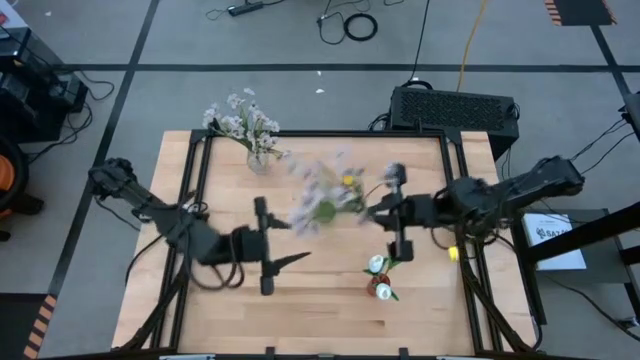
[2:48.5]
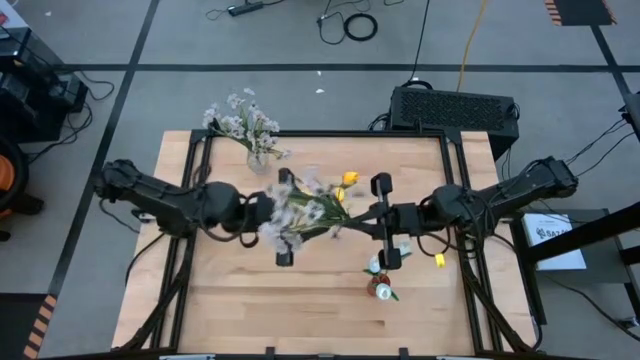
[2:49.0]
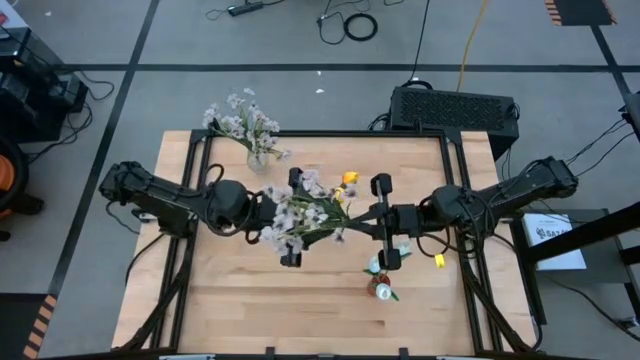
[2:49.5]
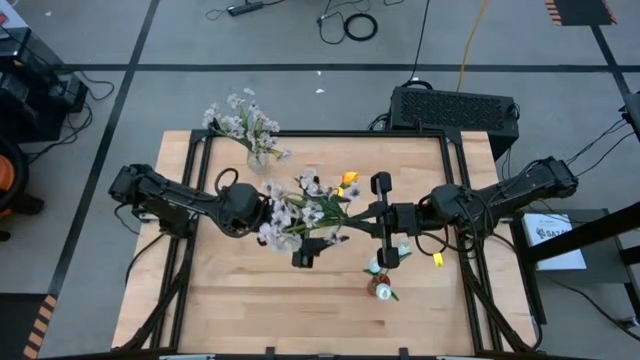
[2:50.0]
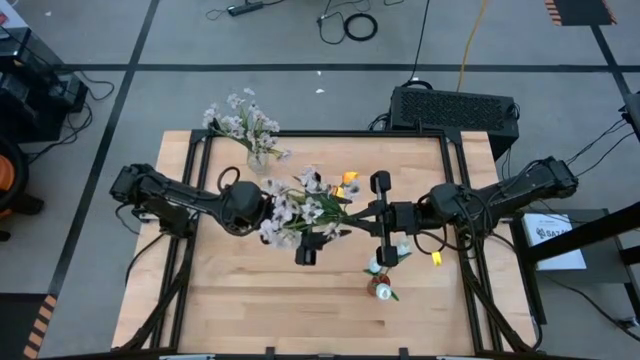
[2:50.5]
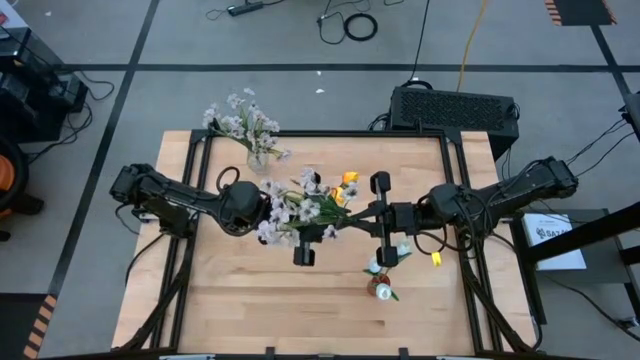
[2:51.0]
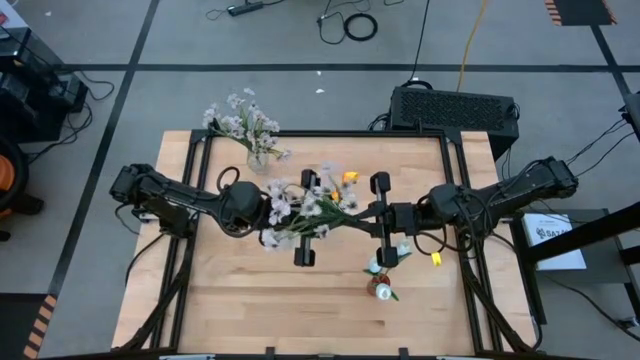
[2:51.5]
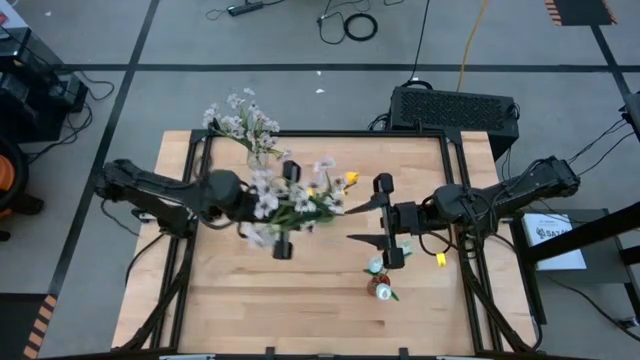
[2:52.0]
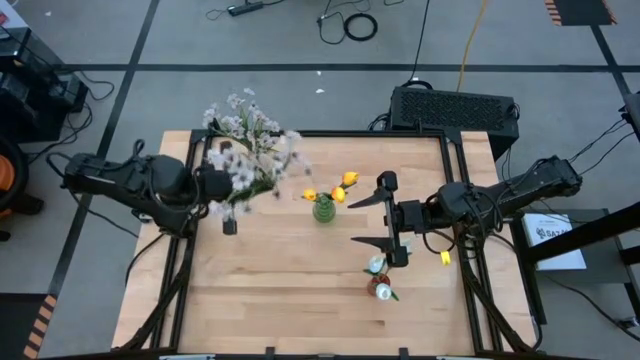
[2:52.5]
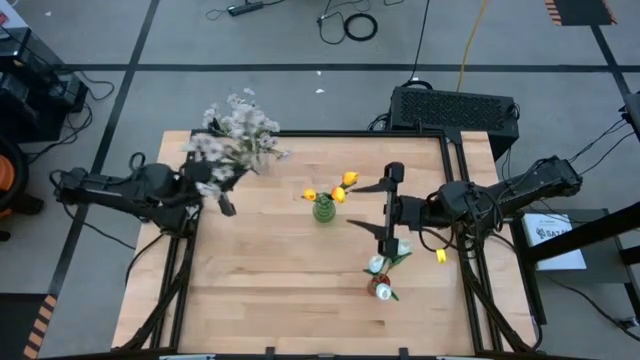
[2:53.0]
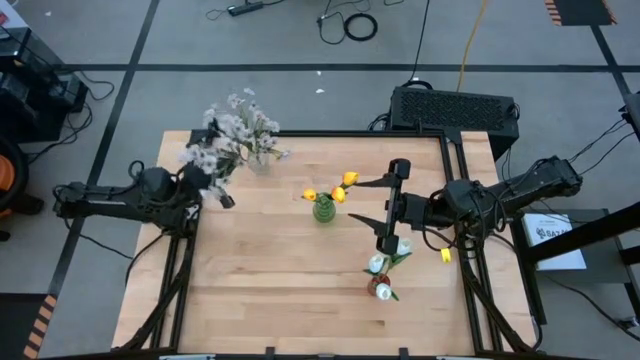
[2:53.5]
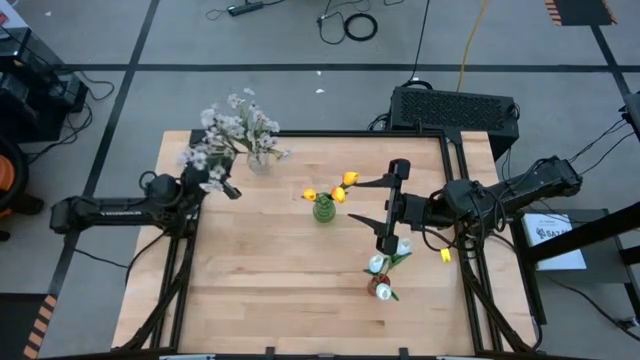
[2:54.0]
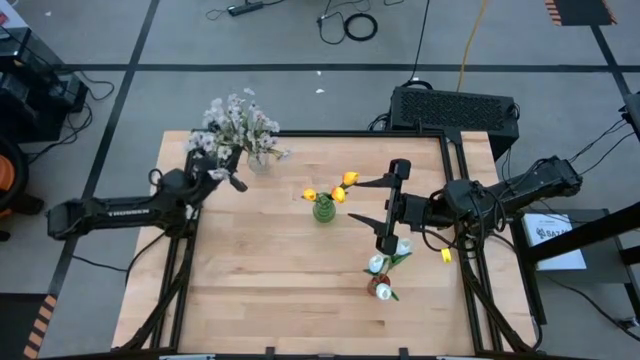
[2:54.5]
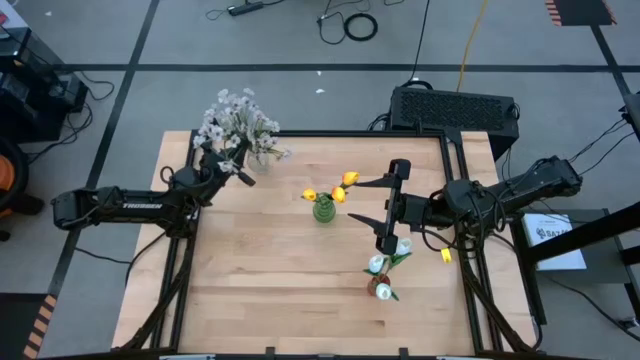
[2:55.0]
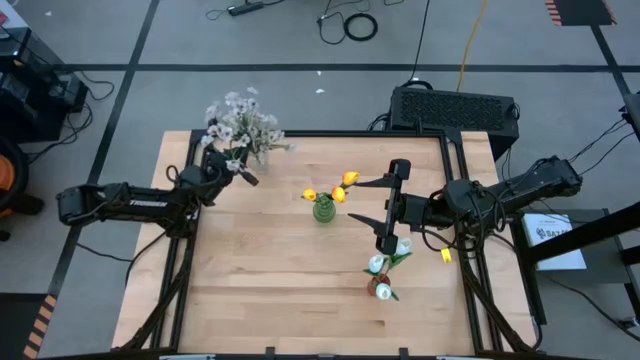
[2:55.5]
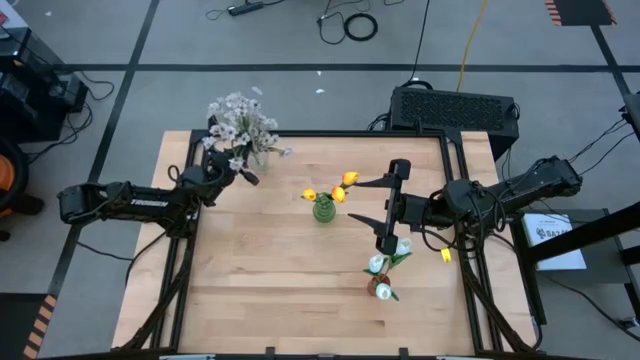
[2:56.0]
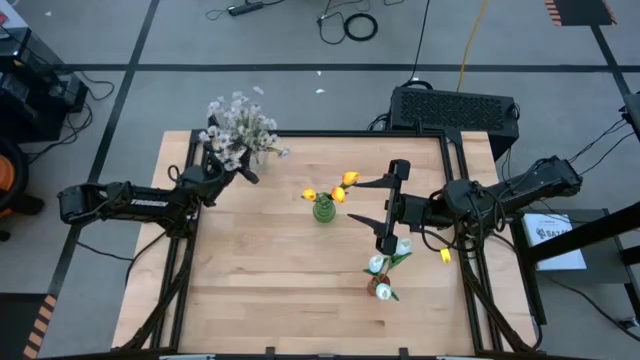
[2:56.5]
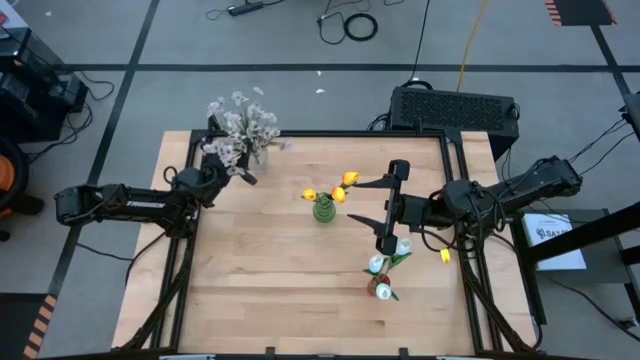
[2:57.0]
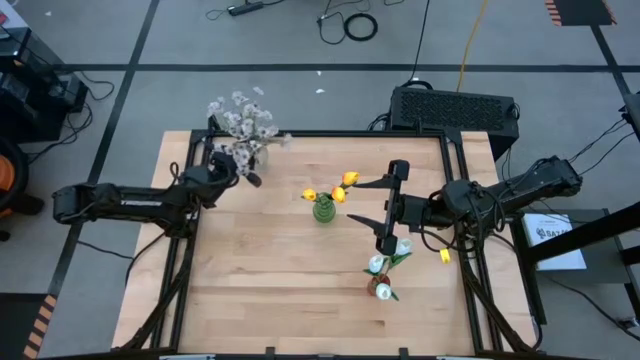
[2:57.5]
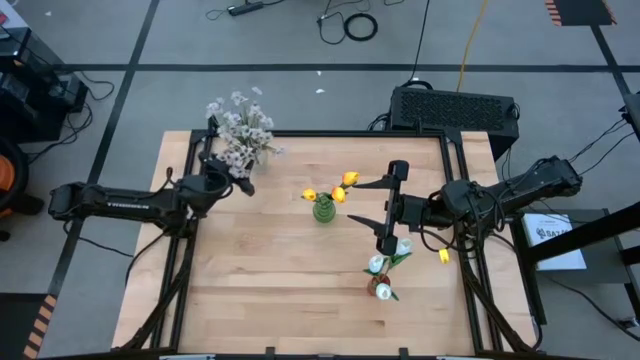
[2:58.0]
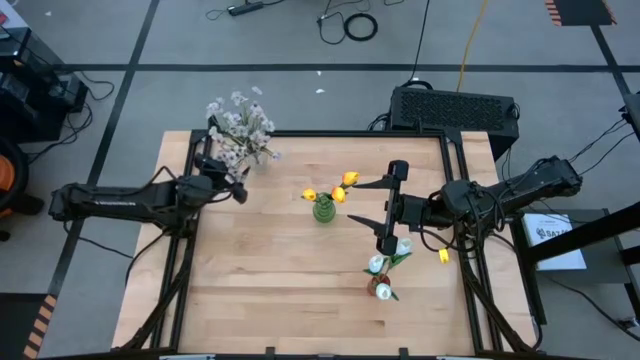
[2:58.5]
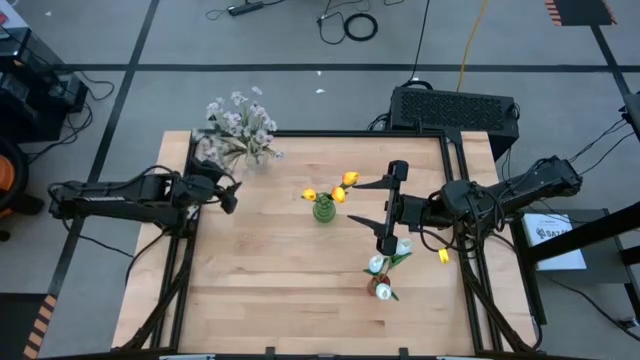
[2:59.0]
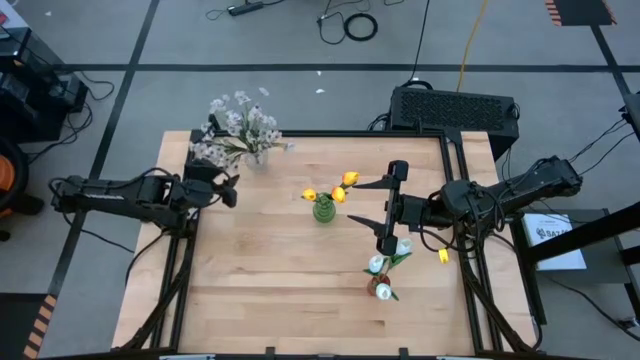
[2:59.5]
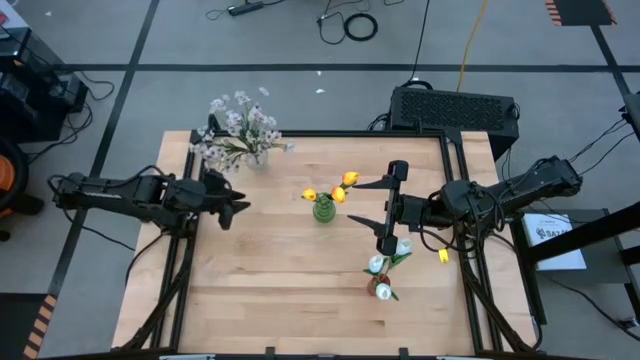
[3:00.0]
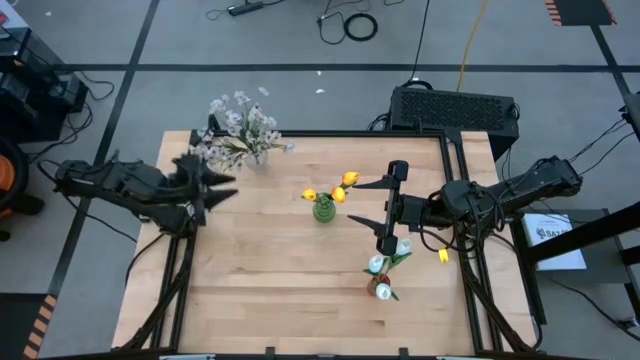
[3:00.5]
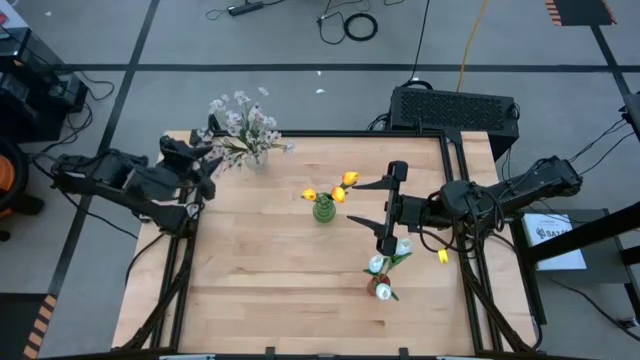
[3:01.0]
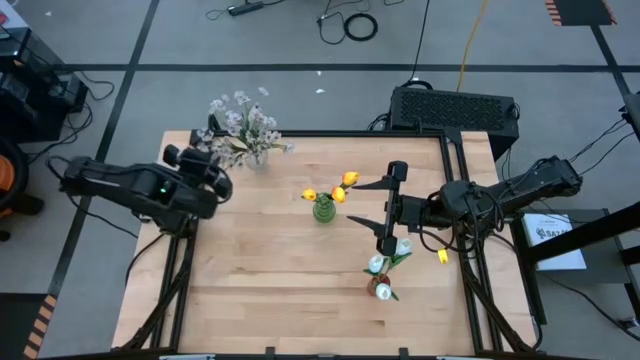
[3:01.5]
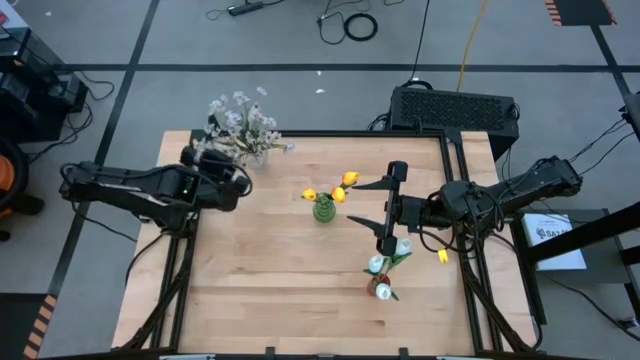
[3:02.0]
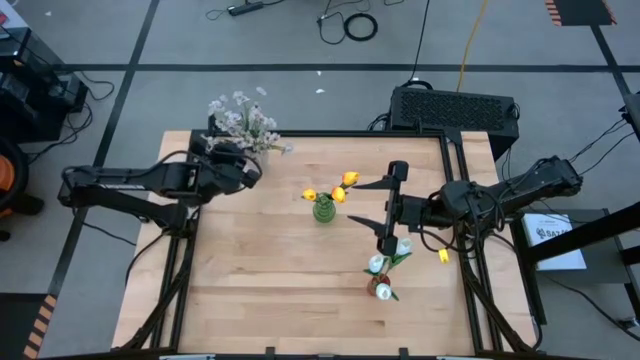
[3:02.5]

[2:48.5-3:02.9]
Task: Sort flowers into vase by color
Put the white flowers into the transparent vase

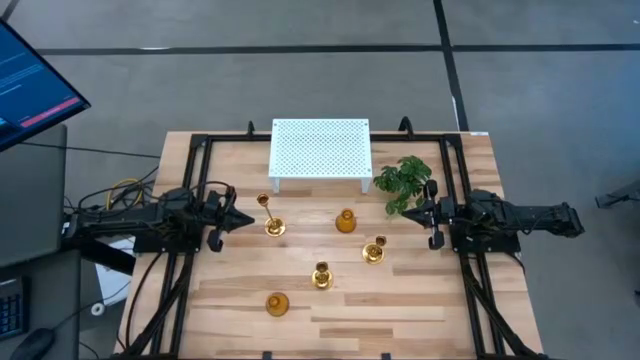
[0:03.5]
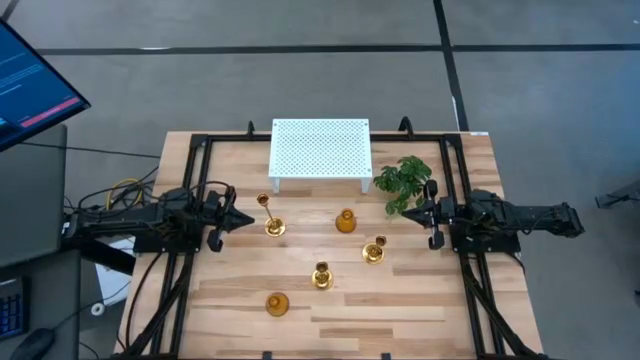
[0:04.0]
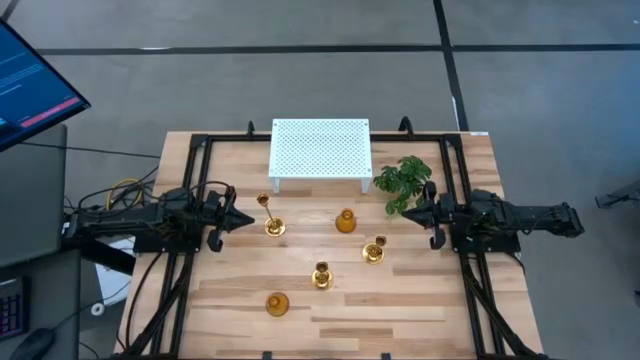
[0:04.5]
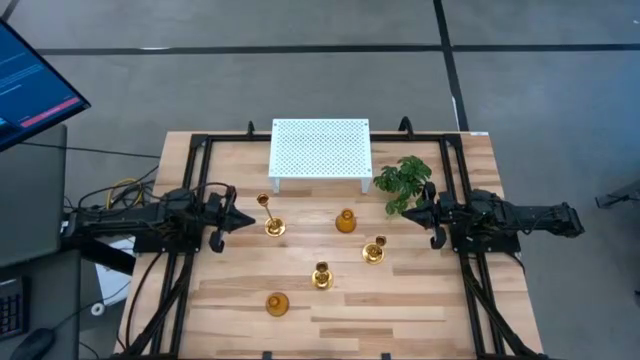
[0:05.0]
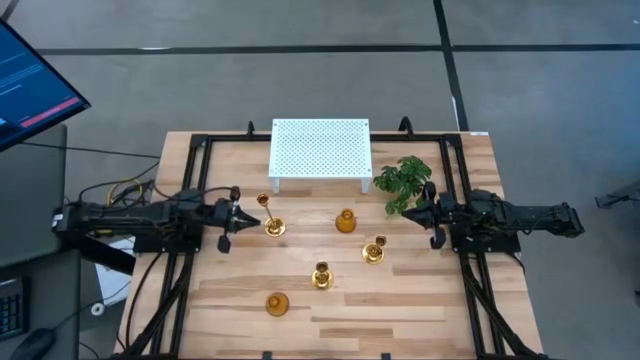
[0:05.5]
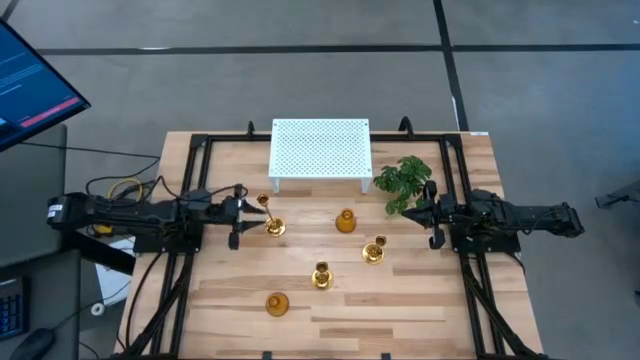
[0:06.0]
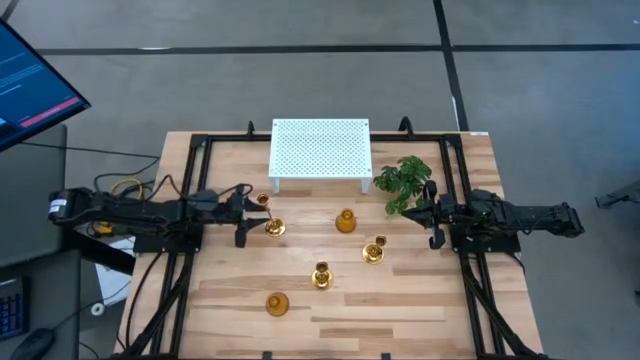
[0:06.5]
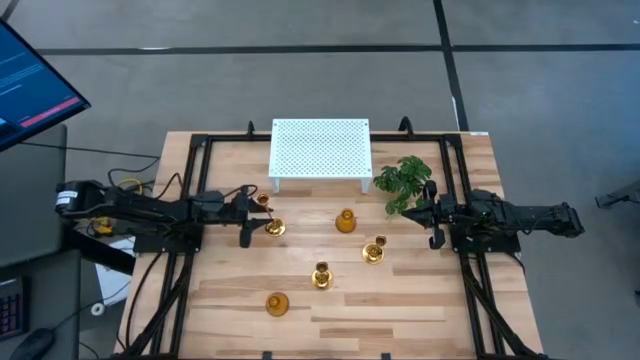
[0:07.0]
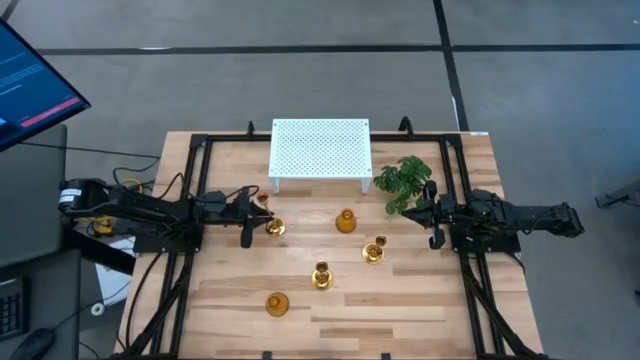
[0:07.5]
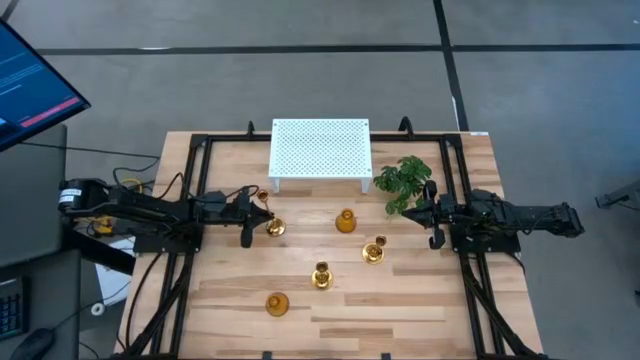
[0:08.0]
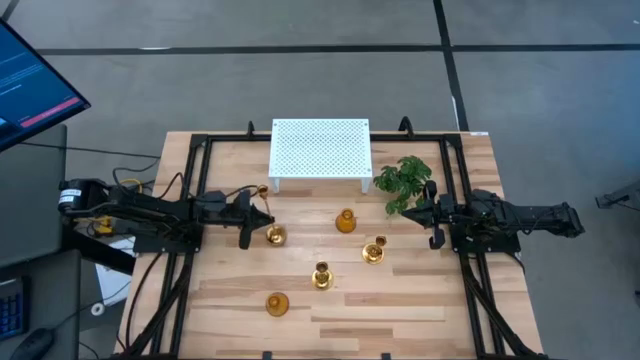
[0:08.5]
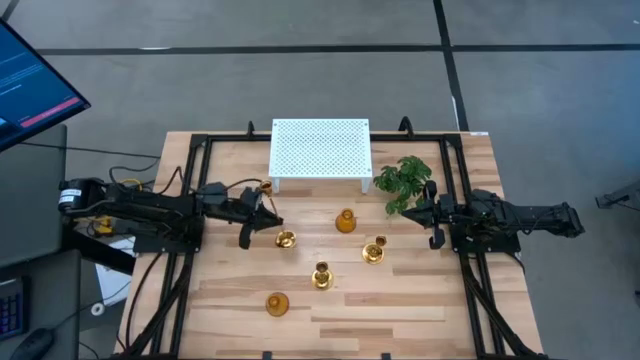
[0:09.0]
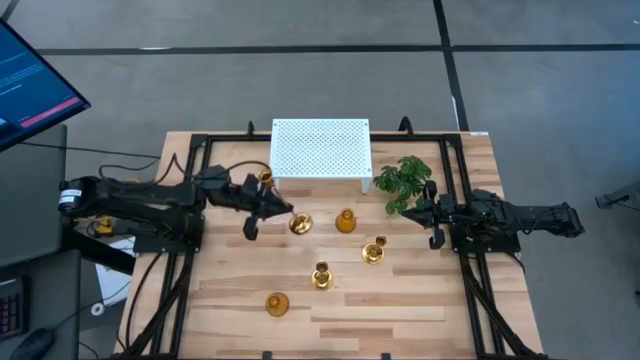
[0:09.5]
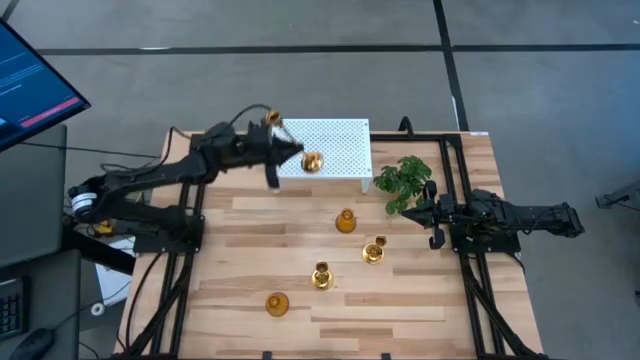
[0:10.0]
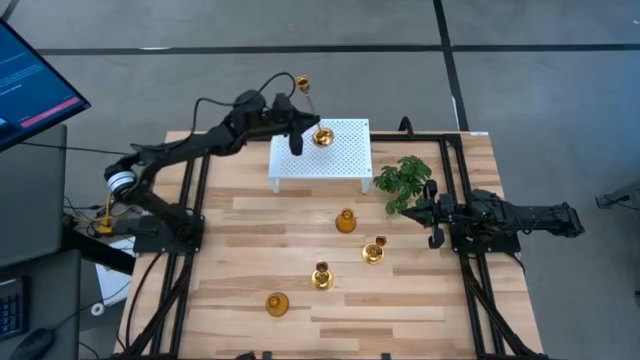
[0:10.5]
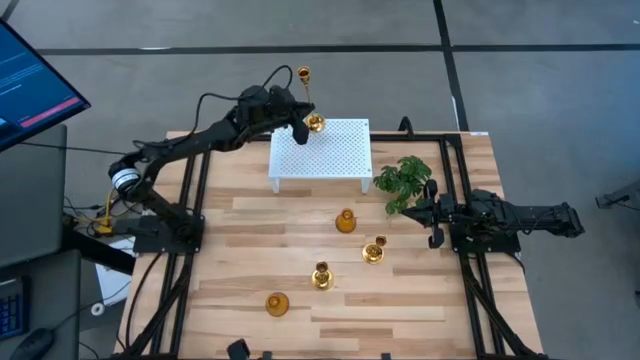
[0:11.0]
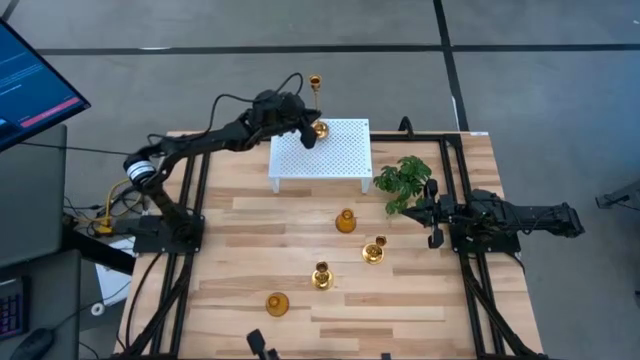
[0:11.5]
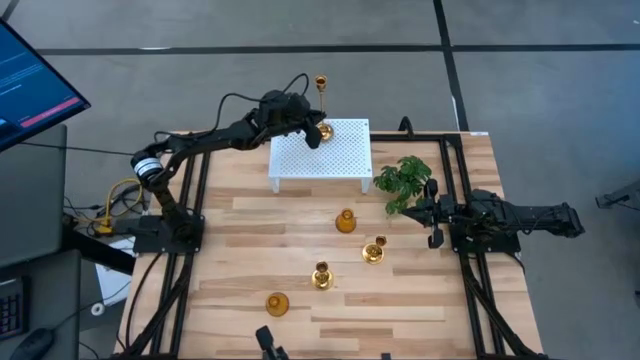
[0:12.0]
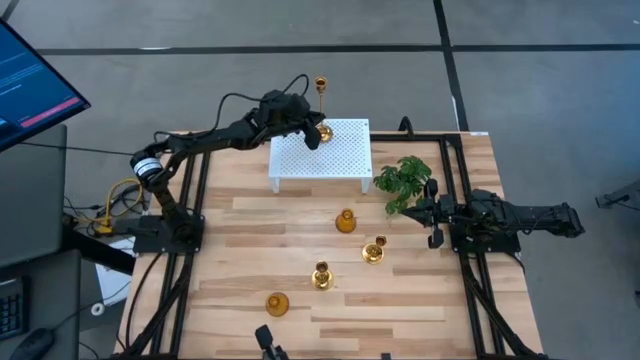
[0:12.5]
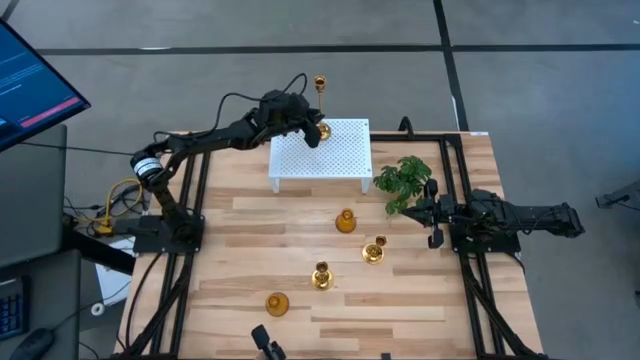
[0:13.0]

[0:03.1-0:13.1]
Task: Pick & Place candle stick holders
Put the top gold candle holder on the shelf
